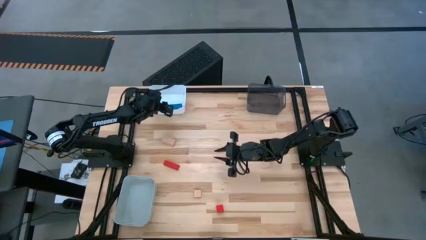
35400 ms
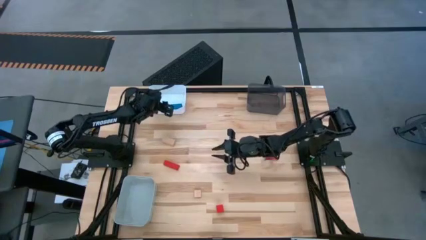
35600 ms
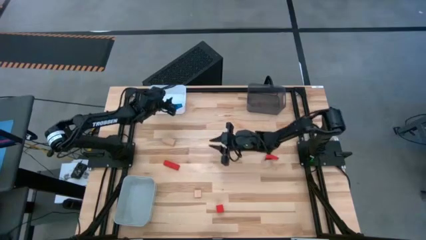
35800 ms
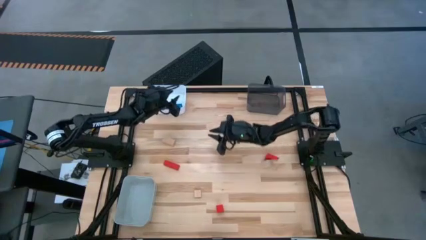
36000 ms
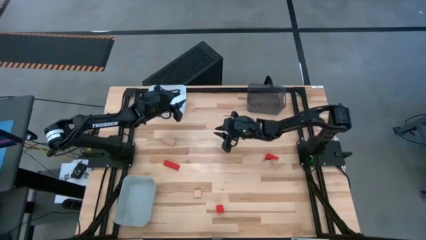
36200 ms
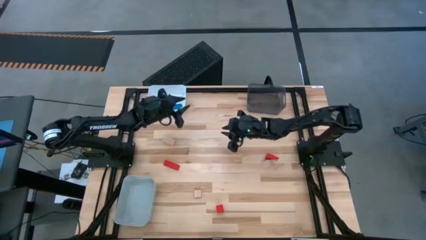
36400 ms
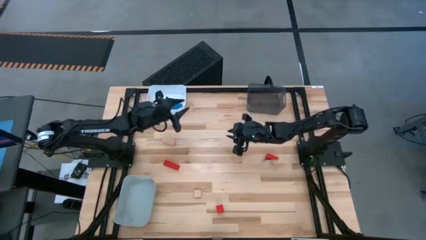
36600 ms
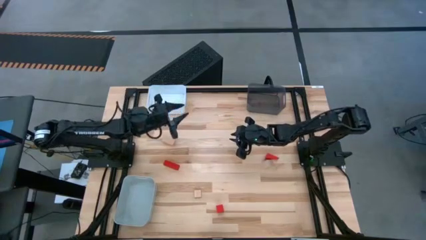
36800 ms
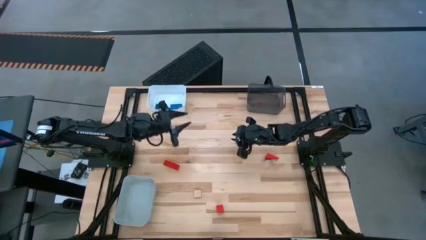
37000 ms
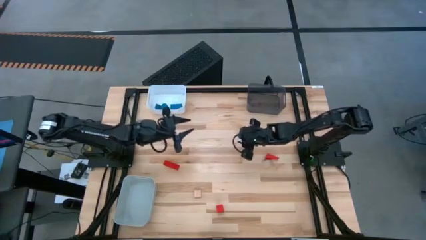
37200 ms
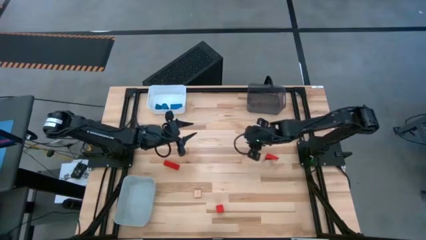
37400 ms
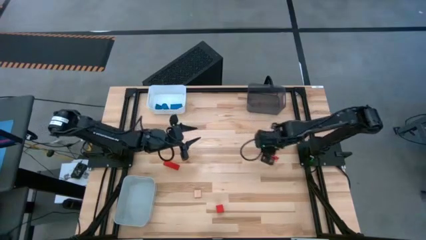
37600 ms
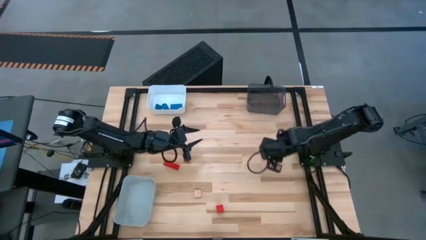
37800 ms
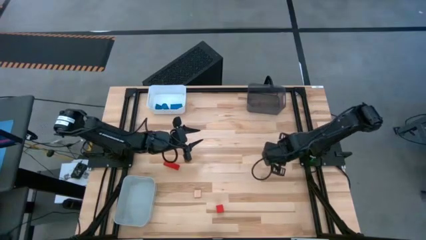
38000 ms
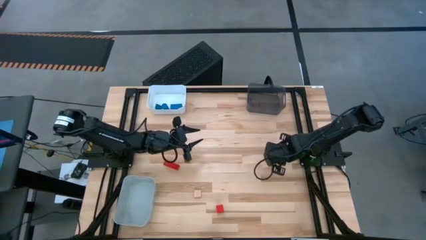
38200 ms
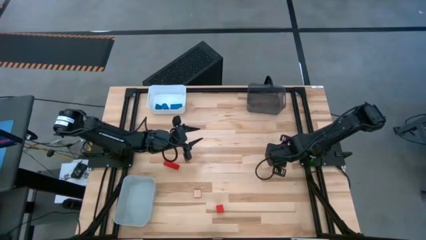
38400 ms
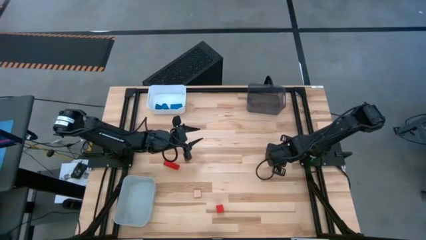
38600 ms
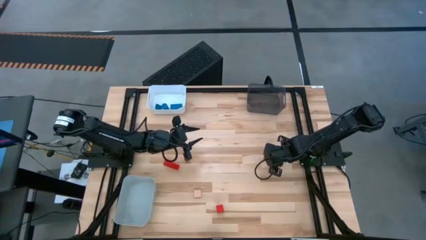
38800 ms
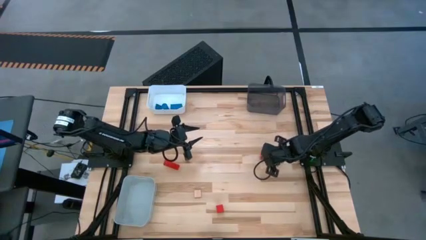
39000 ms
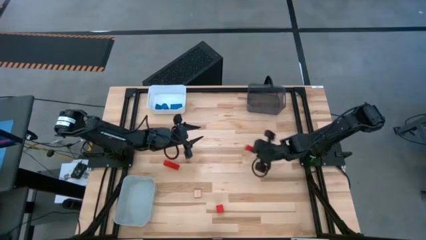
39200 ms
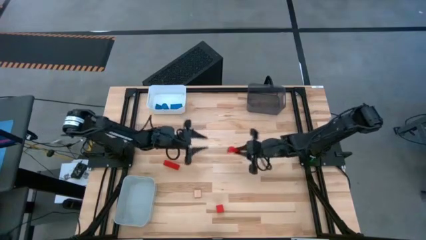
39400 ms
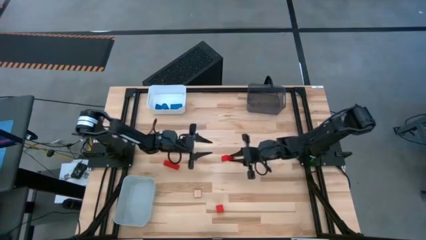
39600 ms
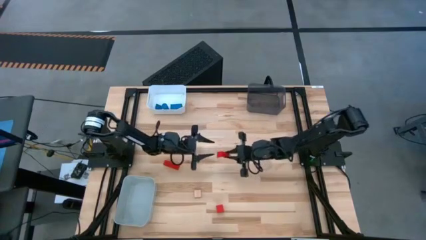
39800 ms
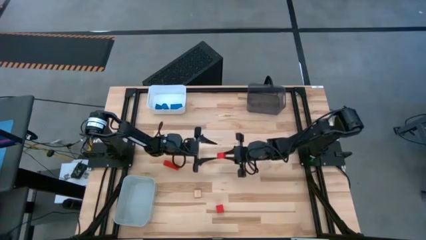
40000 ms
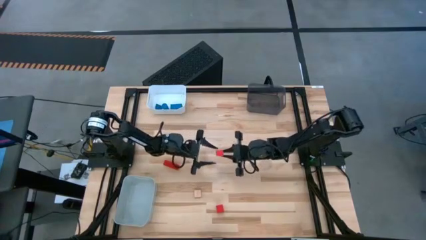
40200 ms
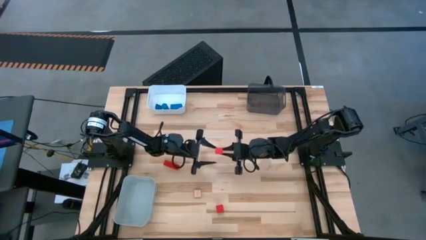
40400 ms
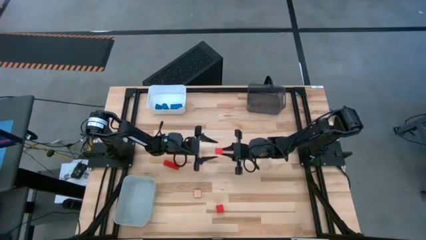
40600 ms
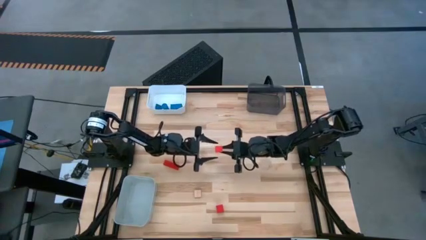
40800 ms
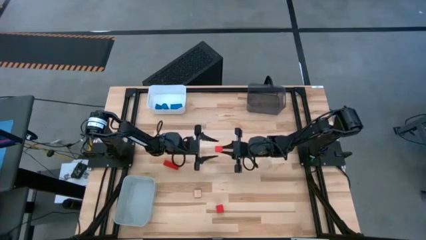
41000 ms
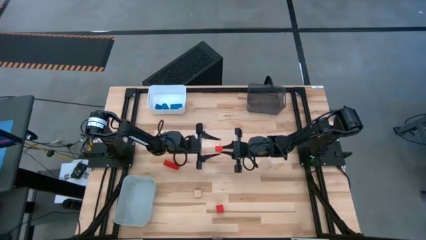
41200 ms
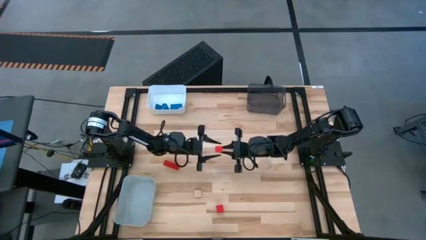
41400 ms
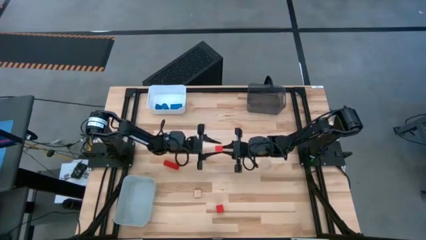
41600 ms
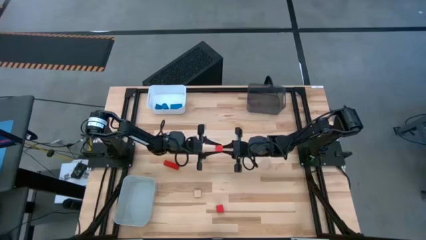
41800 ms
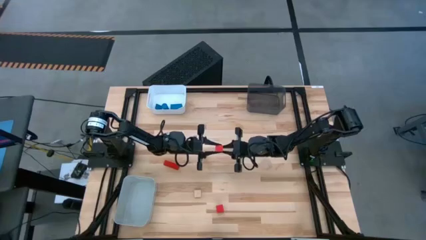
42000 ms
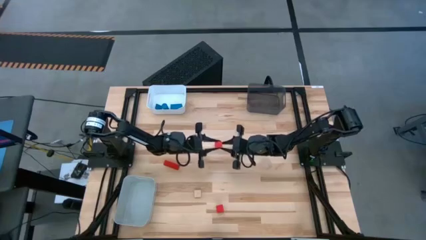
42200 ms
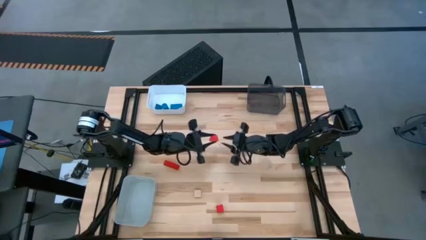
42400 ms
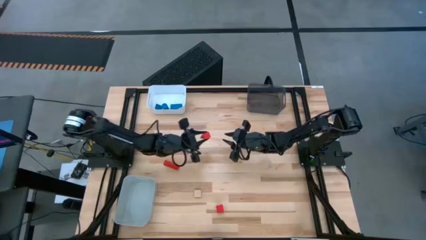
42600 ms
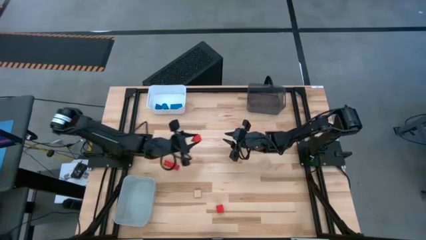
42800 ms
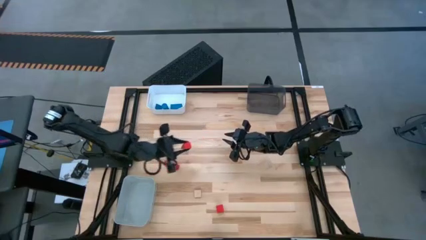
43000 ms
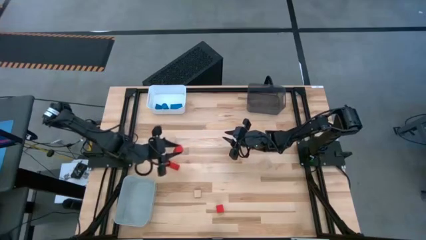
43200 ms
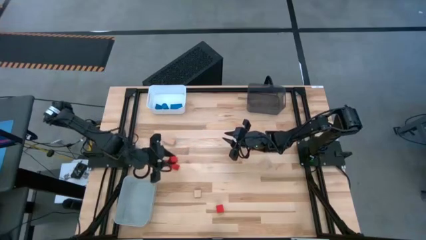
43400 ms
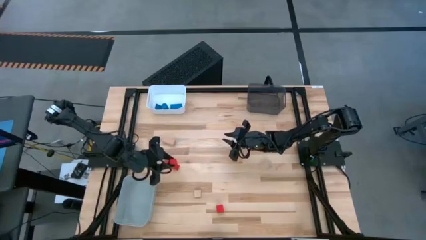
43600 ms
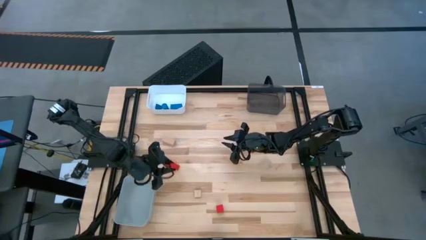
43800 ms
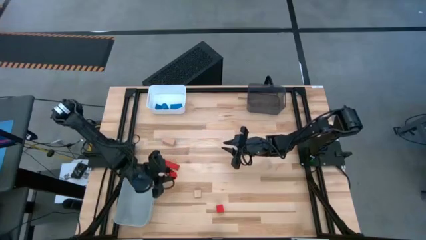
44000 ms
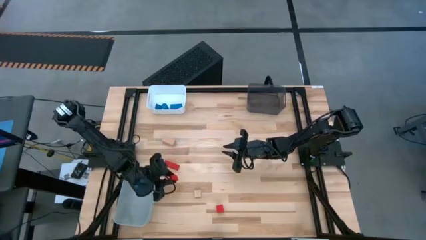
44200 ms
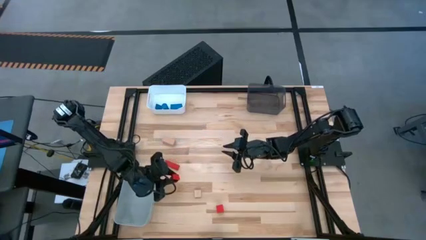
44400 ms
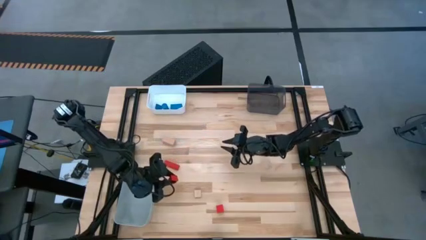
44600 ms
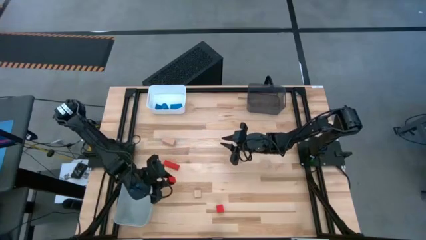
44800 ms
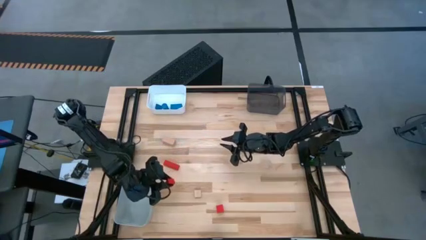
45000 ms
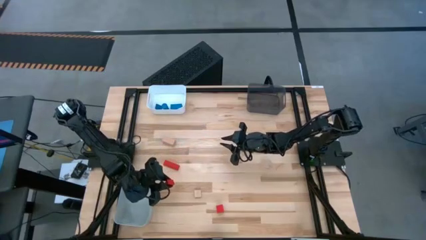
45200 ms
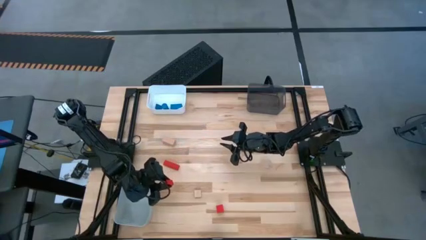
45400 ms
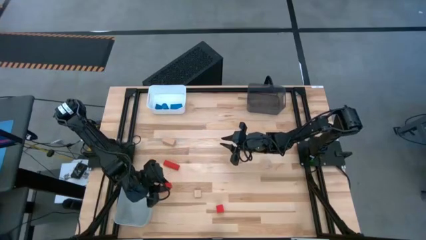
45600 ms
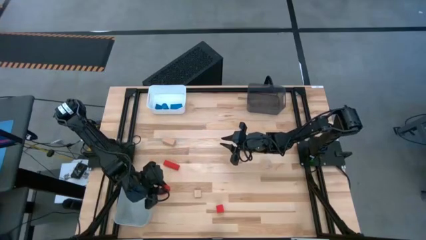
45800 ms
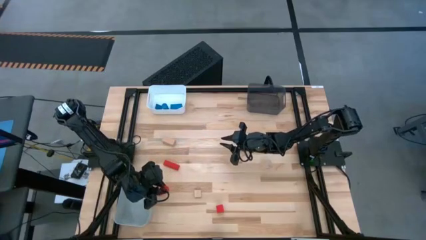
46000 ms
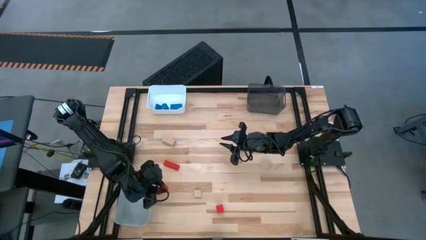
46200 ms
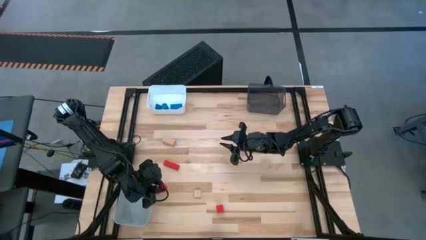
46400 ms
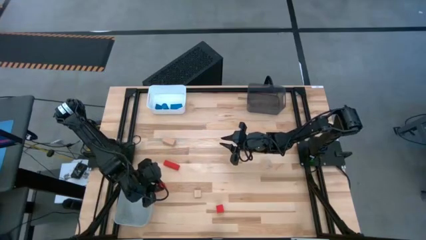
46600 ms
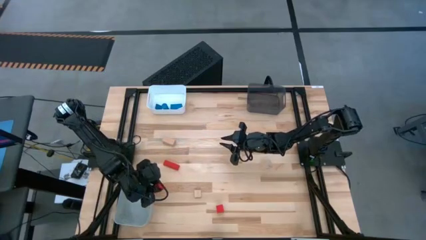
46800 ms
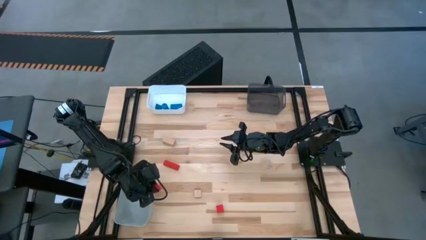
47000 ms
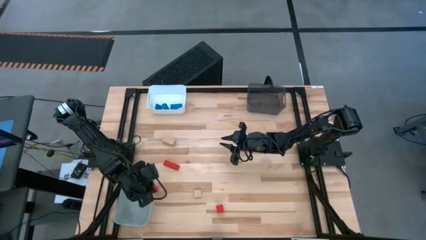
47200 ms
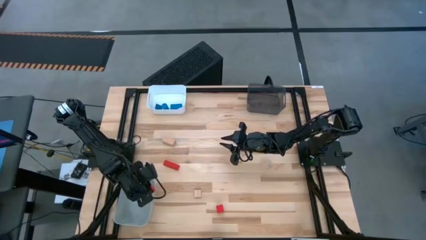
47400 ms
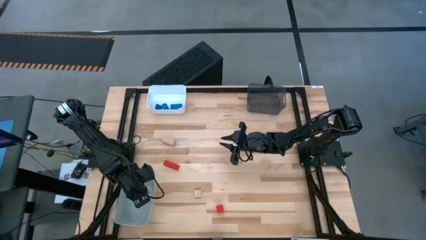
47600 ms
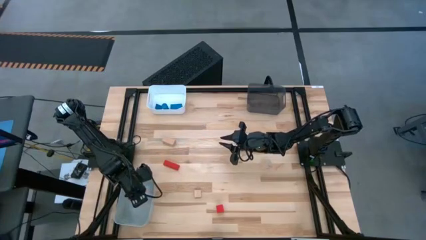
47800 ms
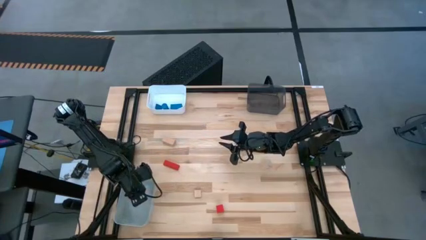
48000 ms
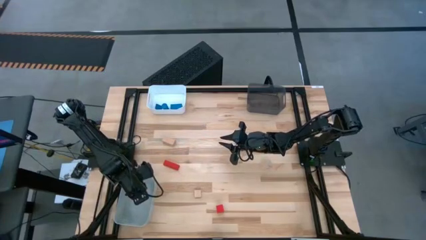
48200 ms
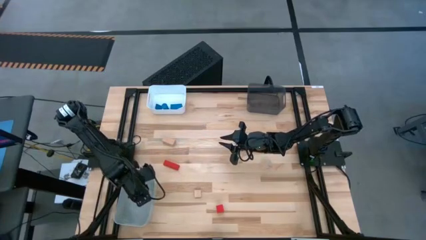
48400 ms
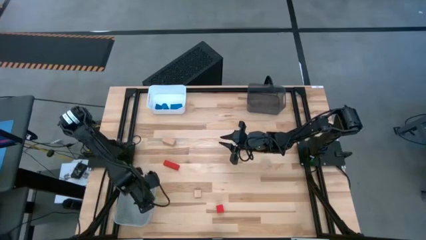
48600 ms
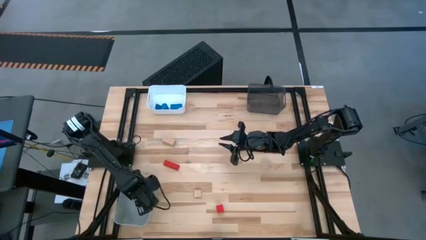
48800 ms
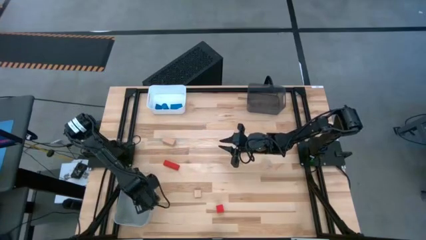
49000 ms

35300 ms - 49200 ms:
Task: Sort & place blocks by color
Put the right red block into the gray bin

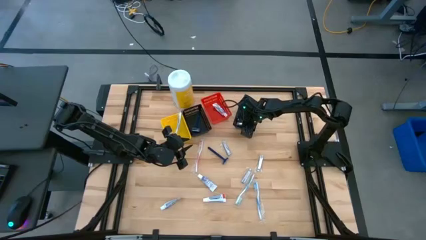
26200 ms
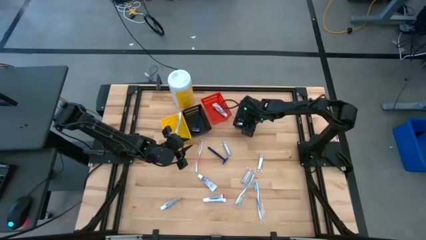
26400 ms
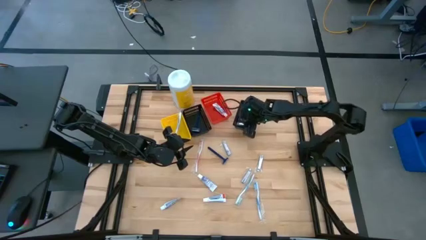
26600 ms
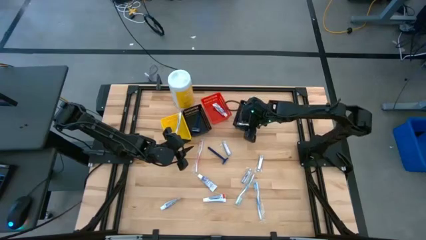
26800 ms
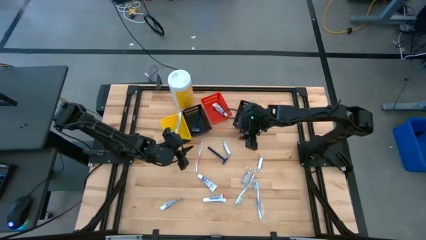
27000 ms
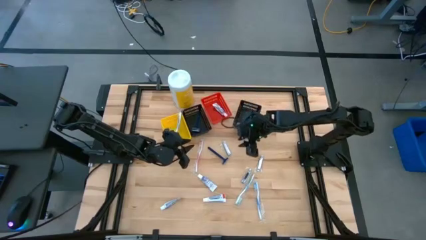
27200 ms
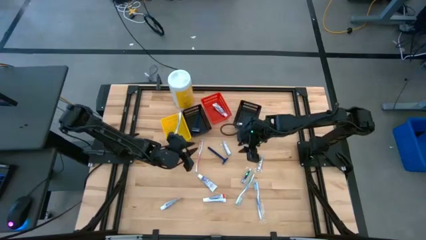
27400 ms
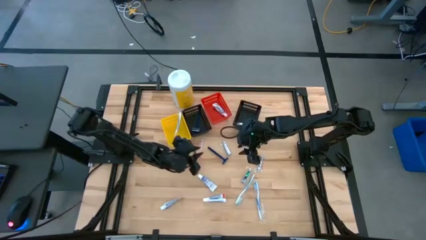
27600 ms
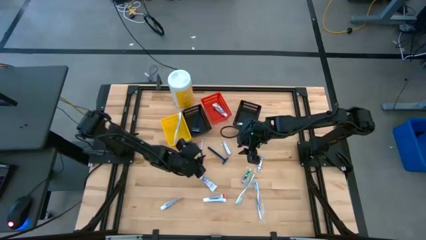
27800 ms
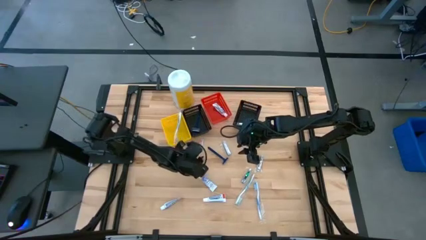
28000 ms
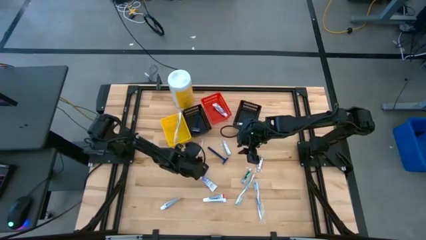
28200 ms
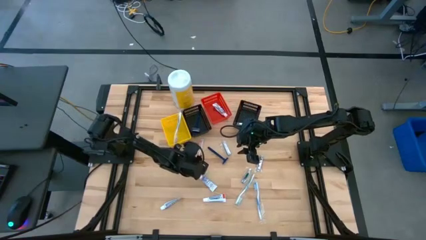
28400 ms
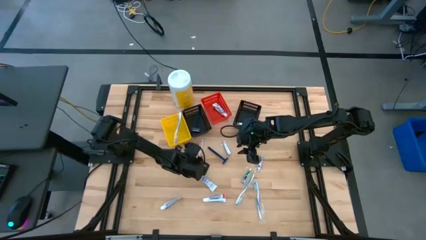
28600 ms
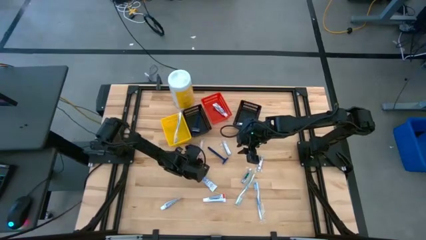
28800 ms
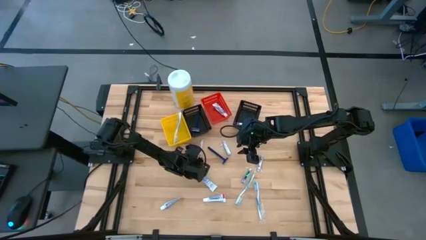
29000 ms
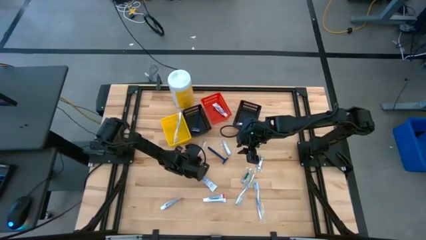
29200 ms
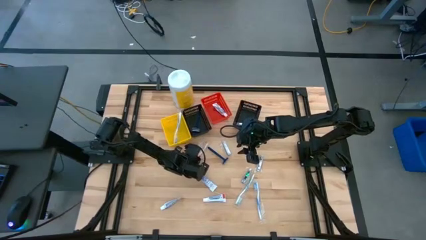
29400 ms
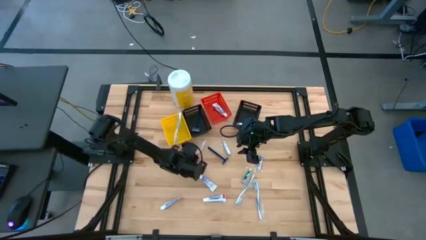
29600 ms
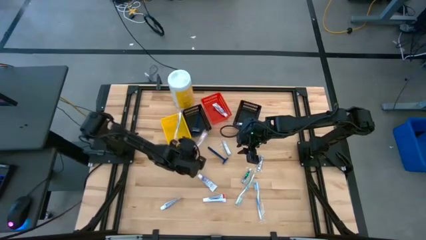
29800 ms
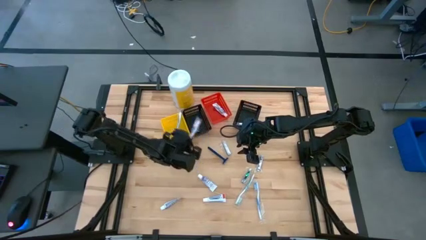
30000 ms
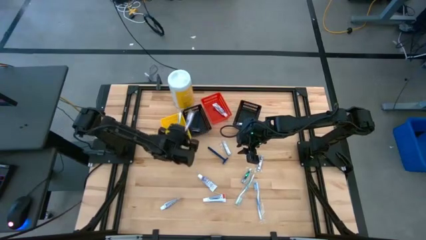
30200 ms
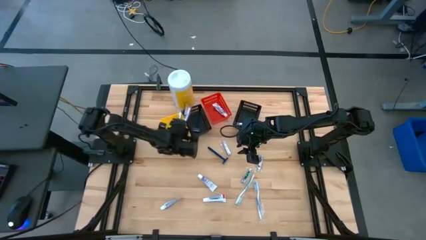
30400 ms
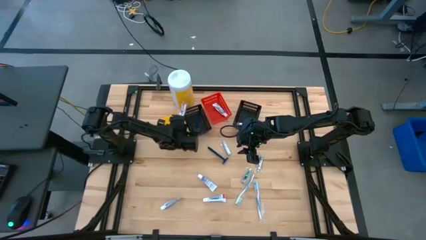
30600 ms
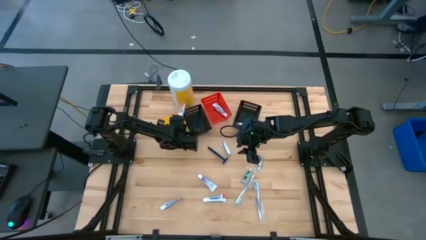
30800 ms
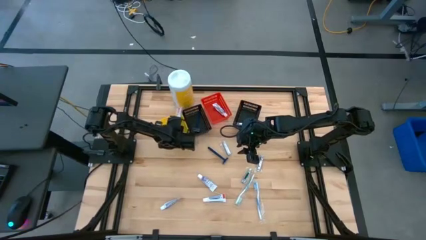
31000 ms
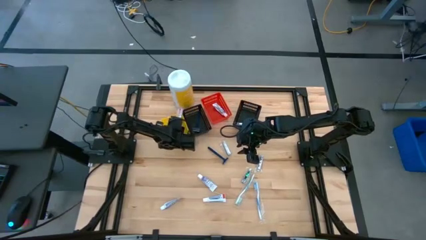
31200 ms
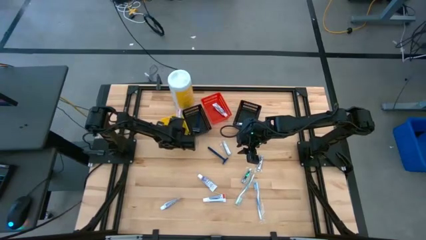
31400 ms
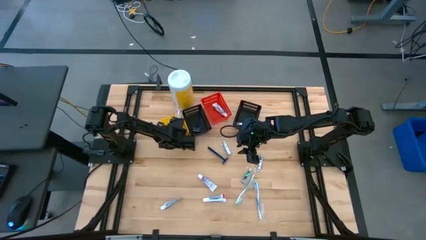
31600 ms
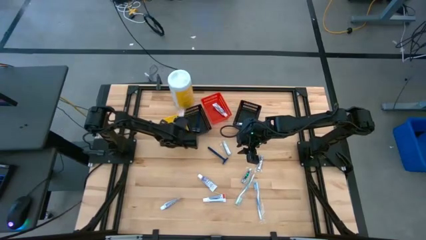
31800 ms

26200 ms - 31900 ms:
Task: Pick & Place Travel size toiletries
Put the orange toothbrush into the yellow bin
